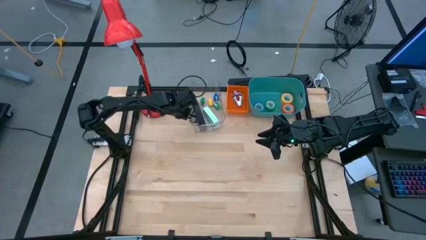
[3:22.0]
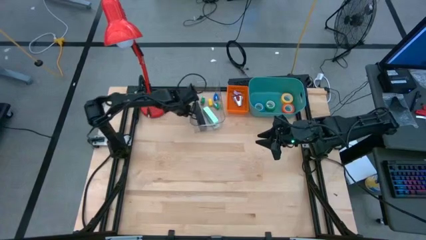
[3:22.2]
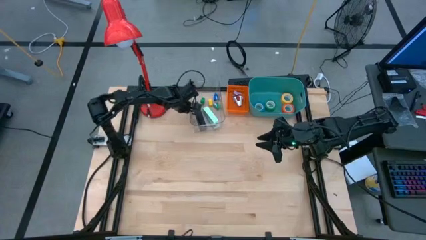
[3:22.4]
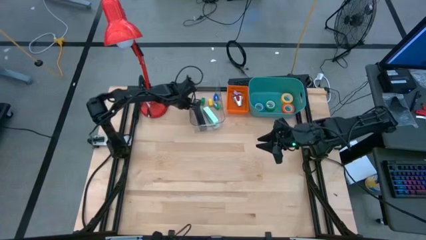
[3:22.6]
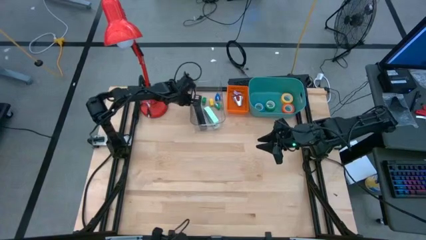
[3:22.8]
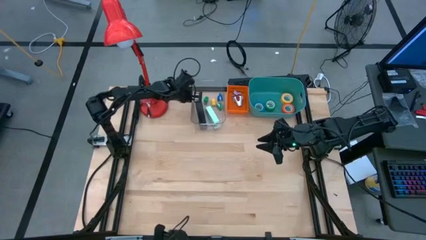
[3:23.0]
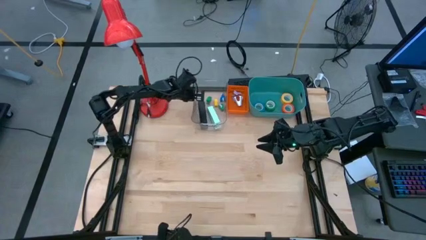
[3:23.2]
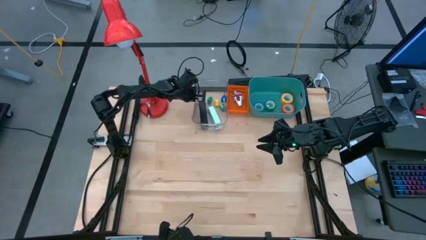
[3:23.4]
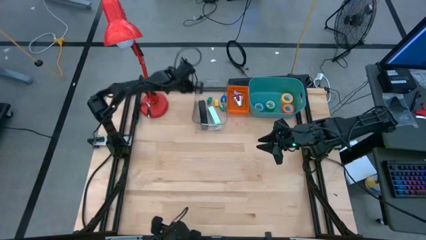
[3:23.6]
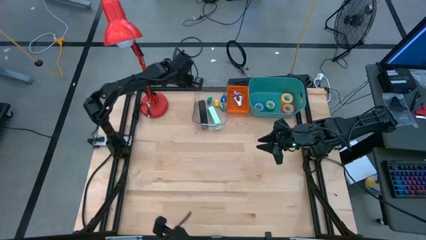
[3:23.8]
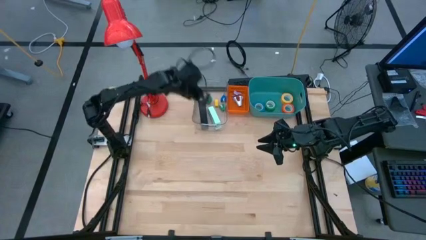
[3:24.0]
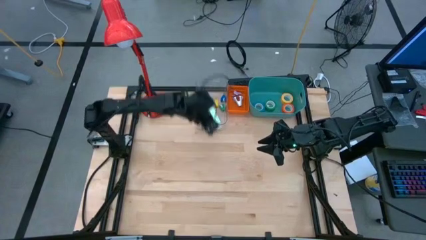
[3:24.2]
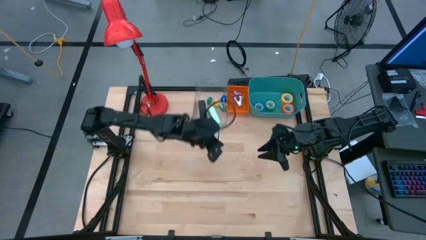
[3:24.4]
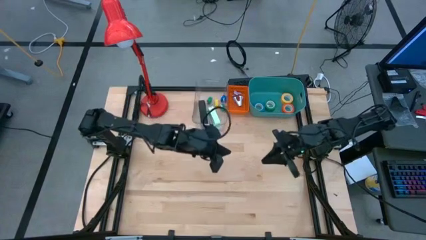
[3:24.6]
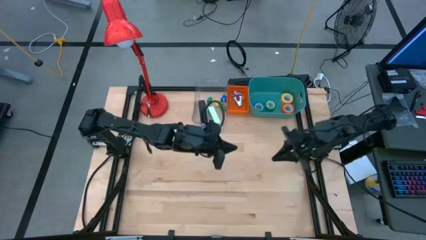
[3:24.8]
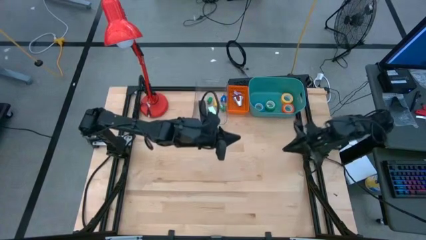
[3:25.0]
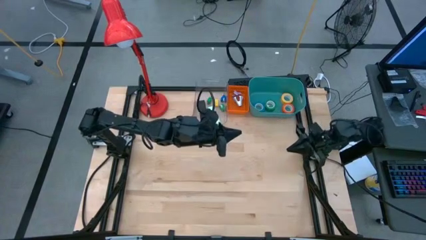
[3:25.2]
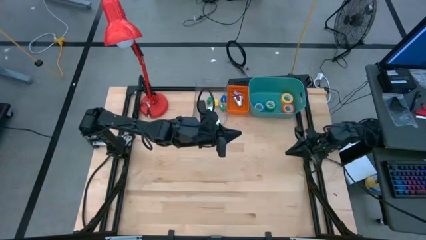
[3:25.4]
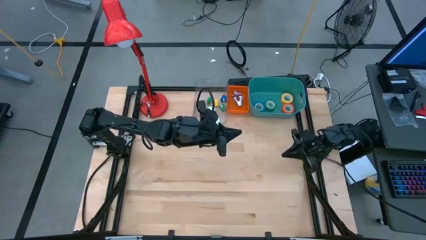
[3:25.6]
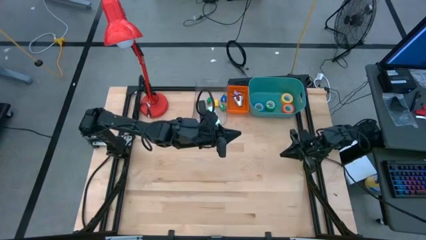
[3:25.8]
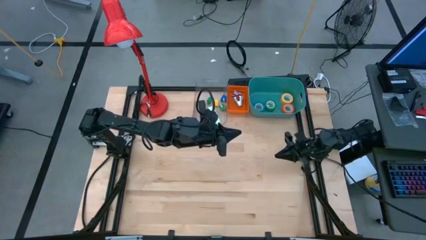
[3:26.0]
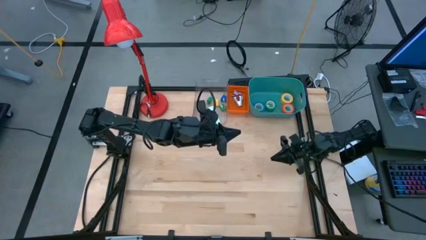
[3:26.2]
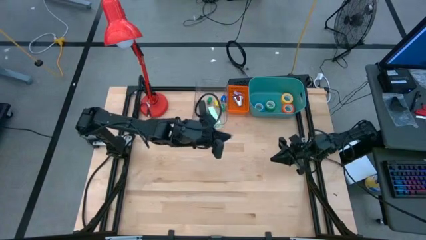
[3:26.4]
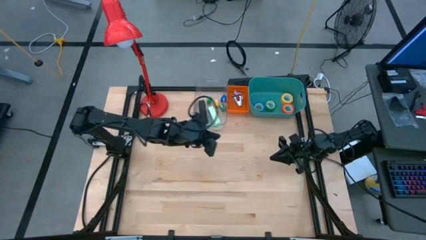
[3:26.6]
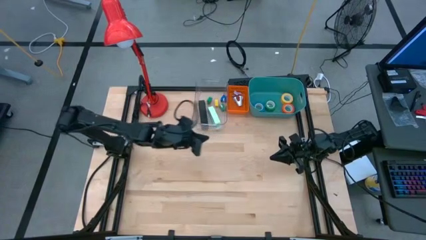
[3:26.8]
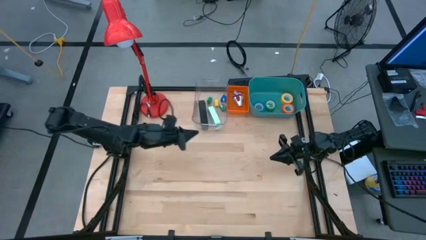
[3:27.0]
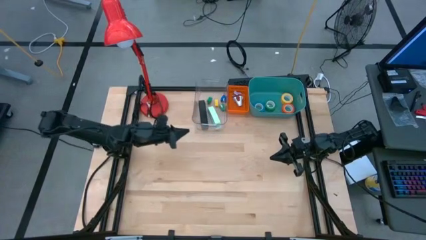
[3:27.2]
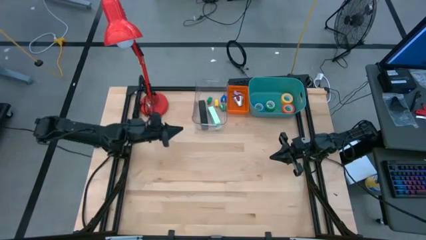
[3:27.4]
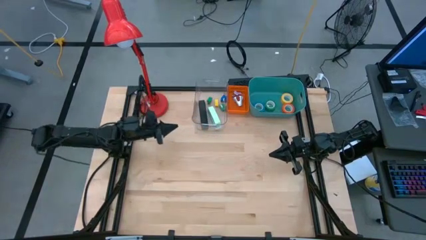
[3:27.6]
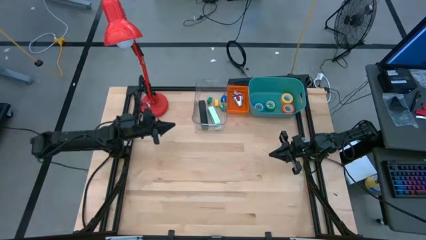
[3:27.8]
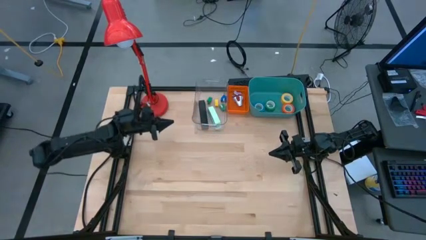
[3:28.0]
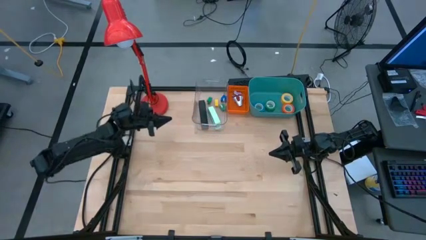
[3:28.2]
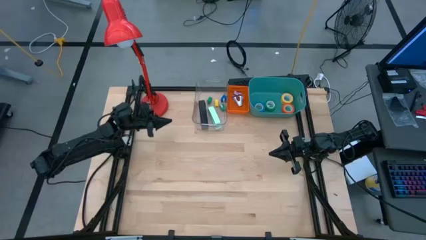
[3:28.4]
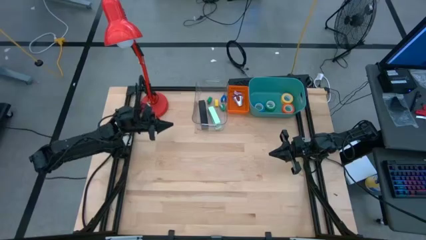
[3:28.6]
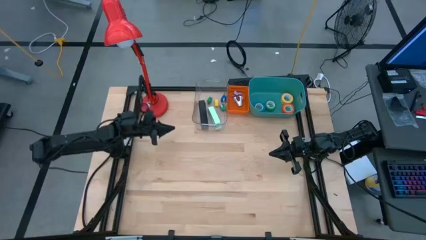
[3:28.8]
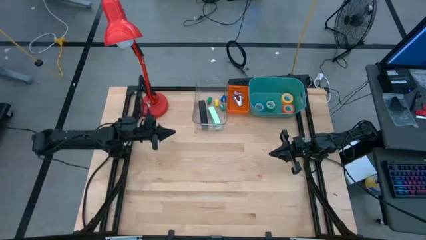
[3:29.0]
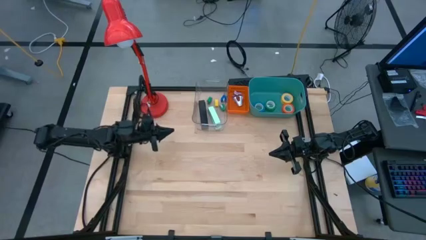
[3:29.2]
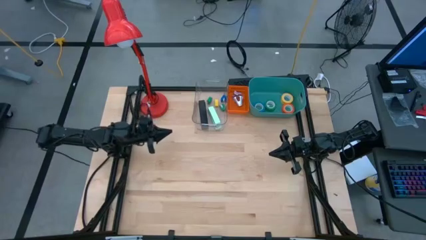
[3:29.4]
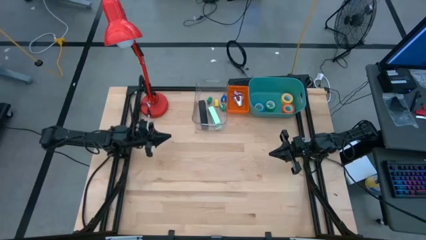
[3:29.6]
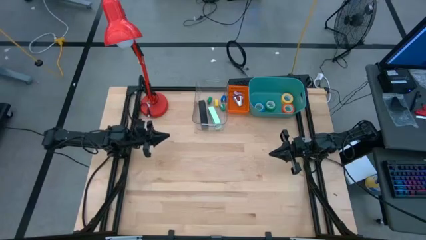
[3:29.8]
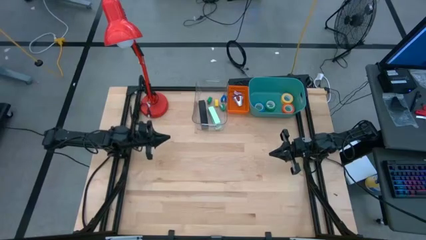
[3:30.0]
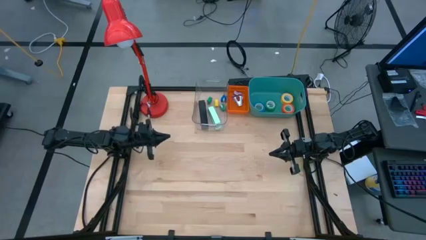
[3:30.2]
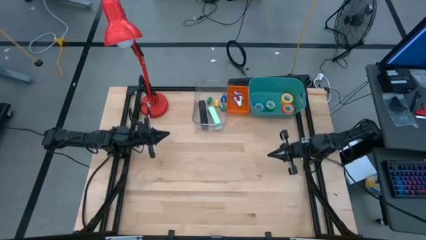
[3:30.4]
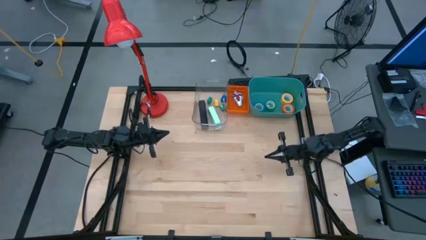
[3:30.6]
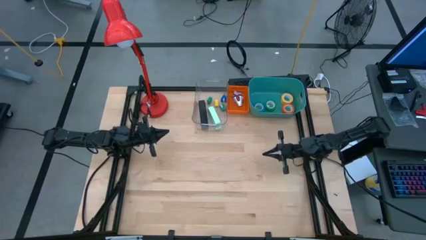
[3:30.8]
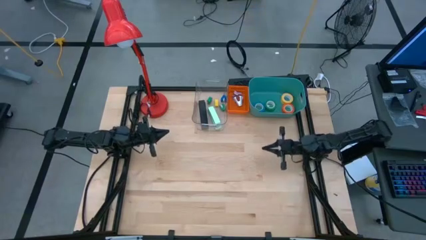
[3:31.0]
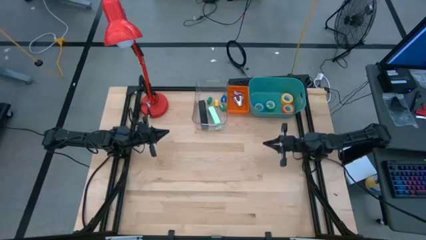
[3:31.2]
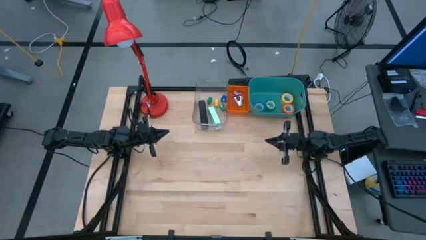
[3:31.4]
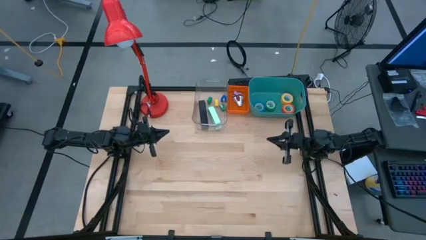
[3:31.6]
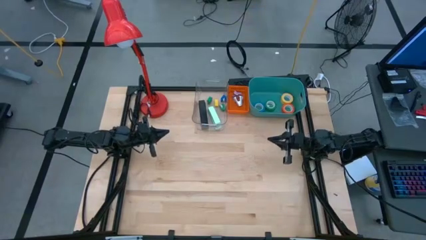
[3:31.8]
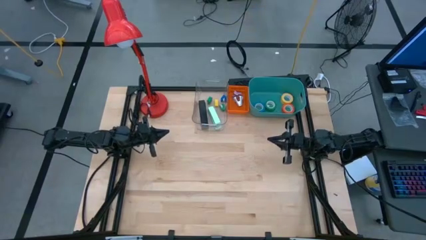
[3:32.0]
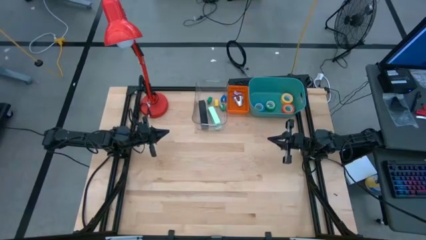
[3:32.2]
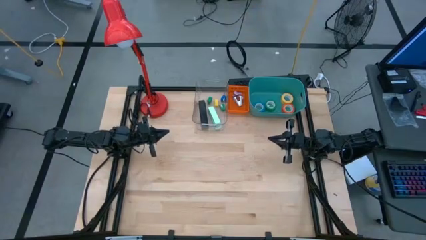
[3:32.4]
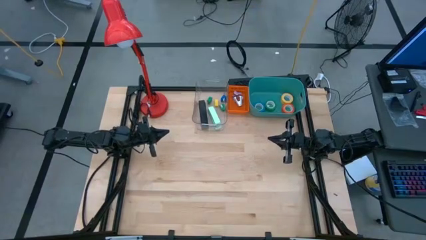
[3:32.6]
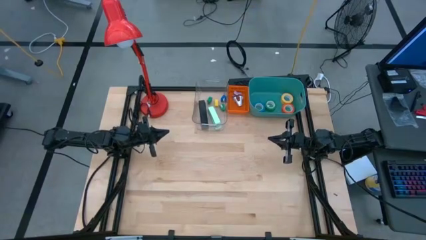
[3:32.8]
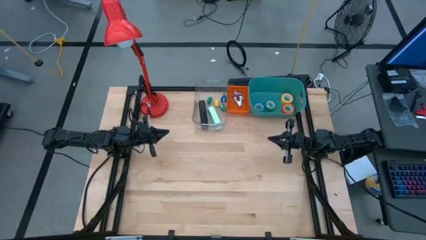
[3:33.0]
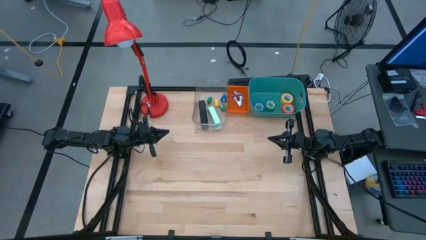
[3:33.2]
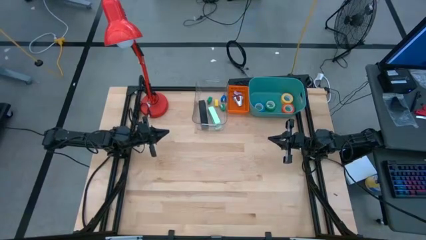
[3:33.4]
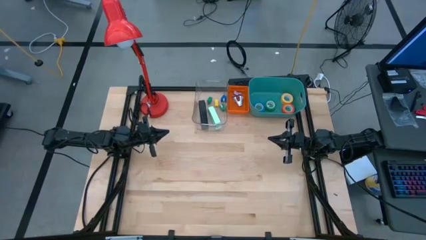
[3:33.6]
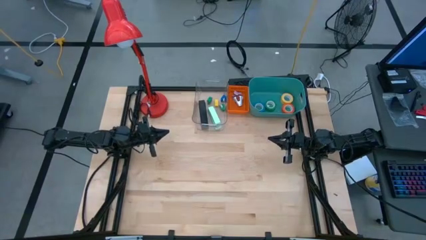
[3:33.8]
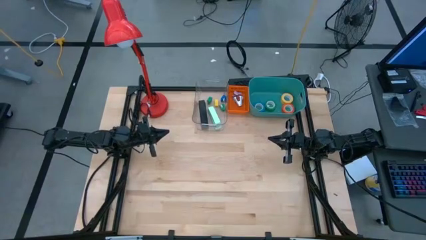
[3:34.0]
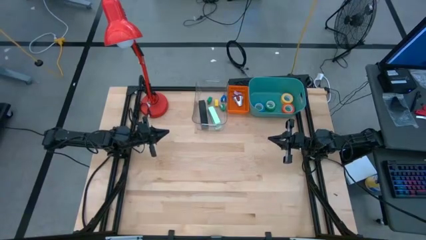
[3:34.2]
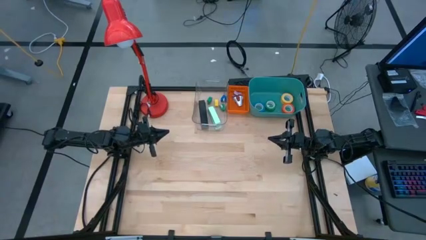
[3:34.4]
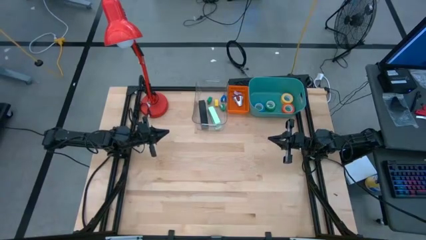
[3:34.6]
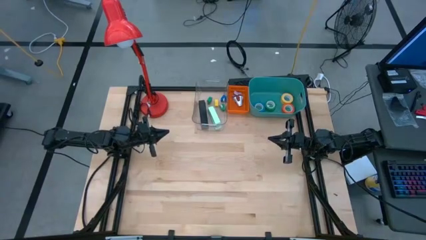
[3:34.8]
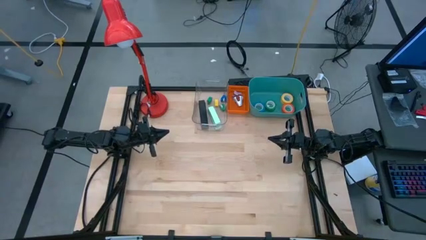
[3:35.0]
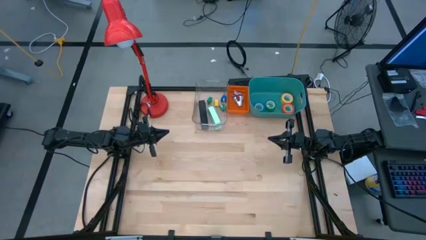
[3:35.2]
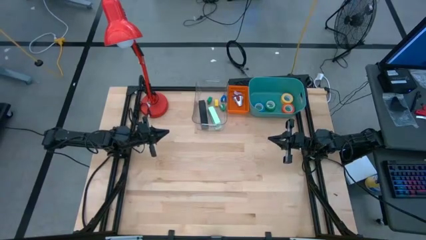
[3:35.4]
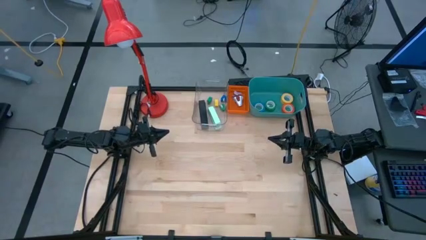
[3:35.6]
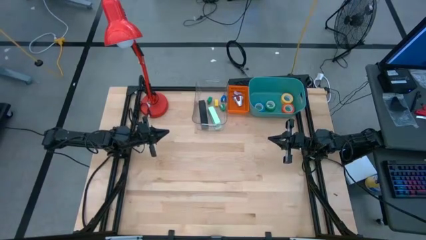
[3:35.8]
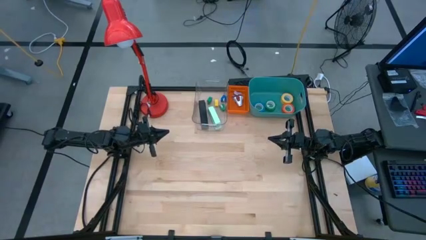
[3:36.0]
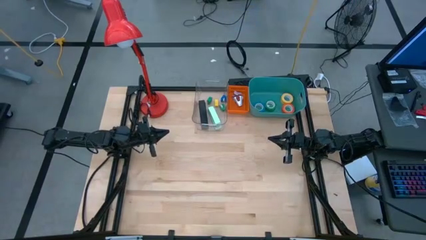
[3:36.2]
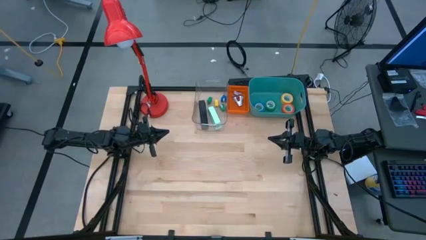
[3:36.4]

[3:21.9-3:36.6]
Task: Pick and place Stapler, Stapler remover, tape
Return to Home Position
